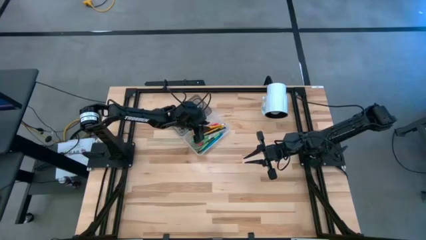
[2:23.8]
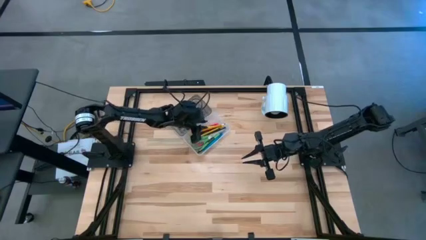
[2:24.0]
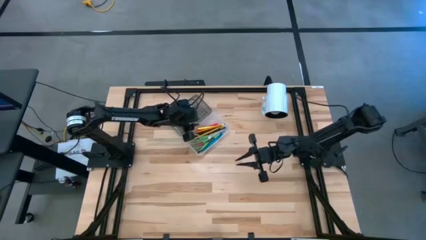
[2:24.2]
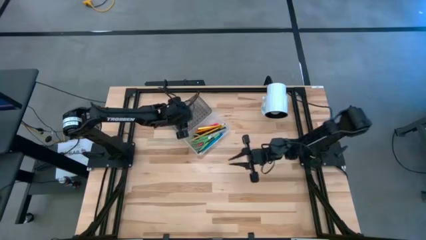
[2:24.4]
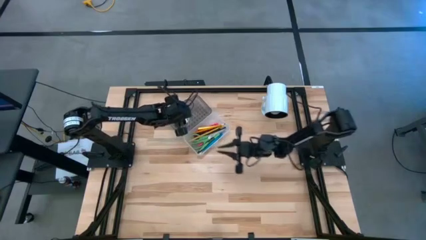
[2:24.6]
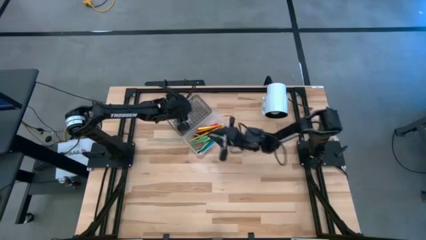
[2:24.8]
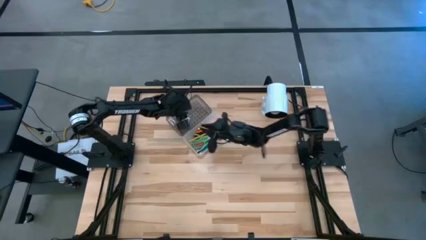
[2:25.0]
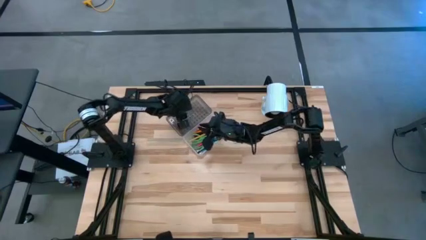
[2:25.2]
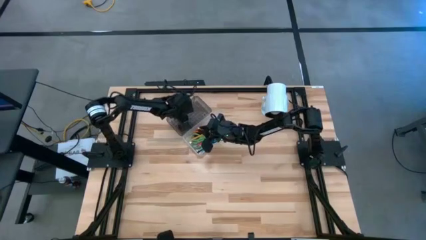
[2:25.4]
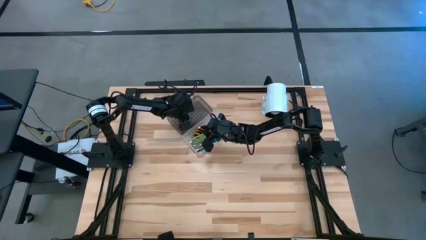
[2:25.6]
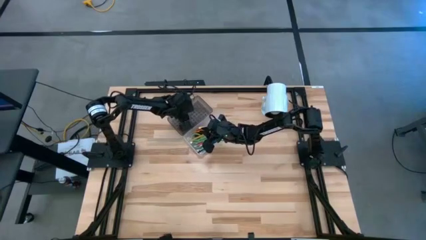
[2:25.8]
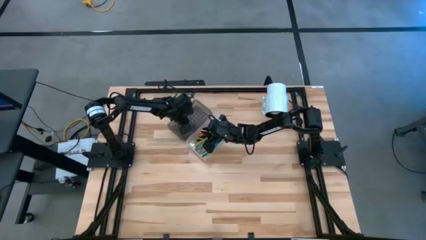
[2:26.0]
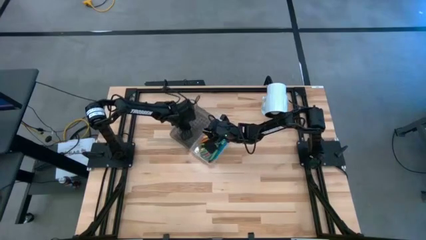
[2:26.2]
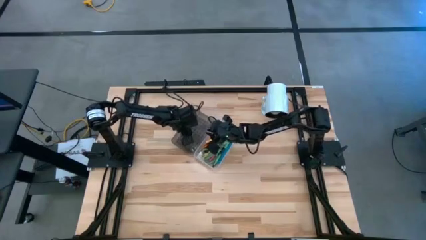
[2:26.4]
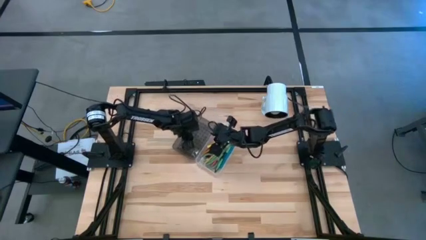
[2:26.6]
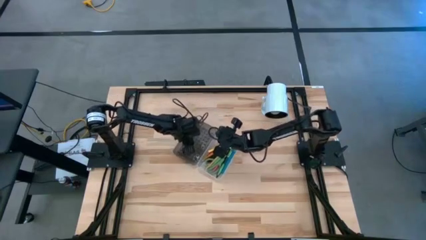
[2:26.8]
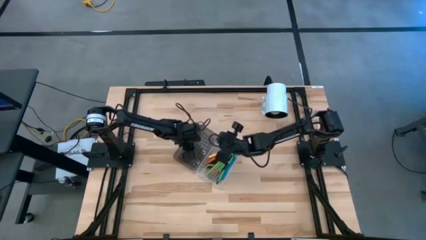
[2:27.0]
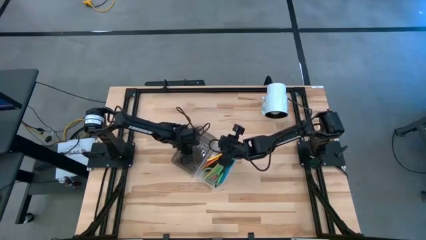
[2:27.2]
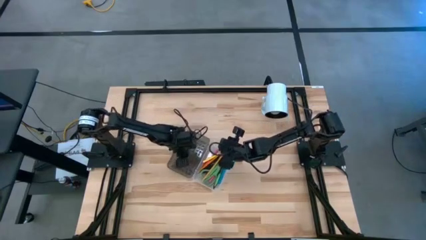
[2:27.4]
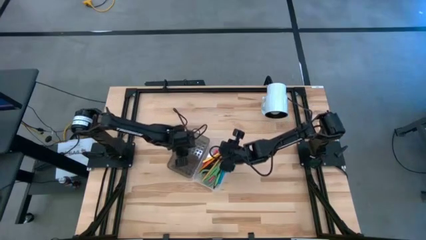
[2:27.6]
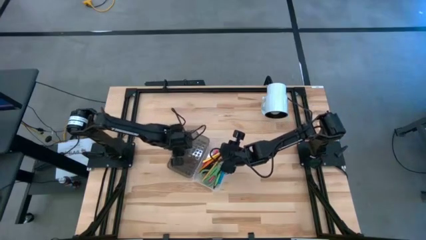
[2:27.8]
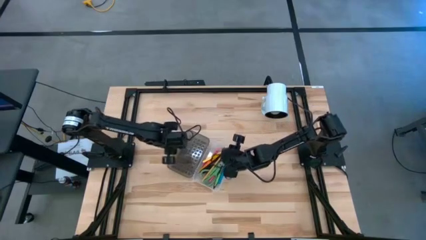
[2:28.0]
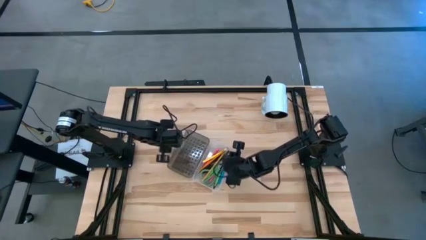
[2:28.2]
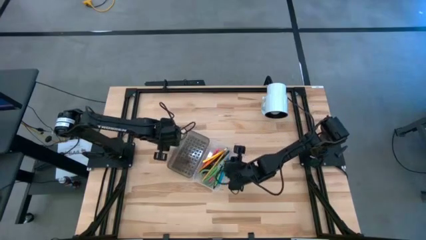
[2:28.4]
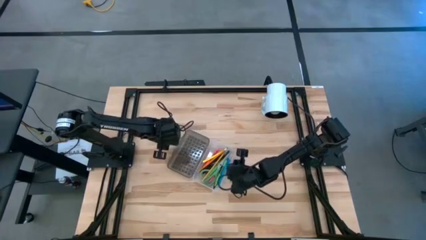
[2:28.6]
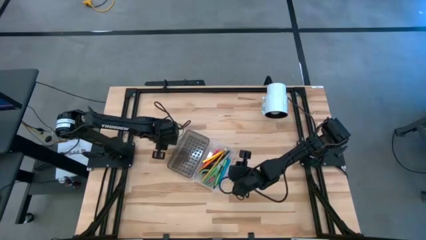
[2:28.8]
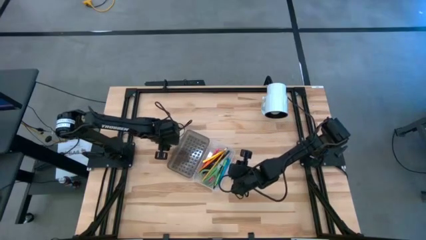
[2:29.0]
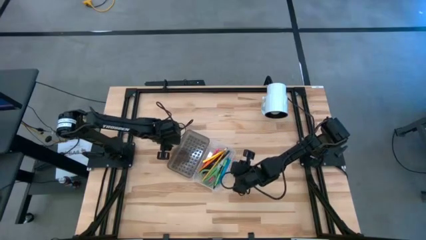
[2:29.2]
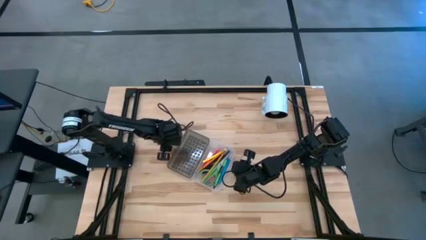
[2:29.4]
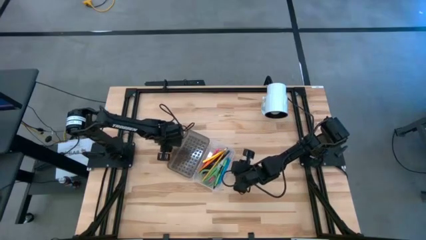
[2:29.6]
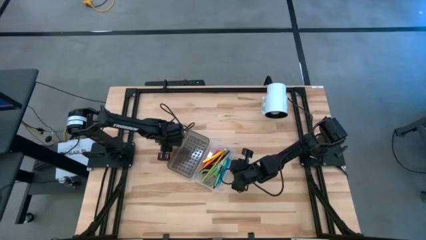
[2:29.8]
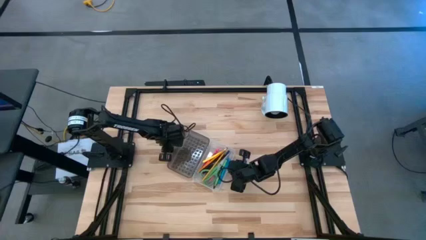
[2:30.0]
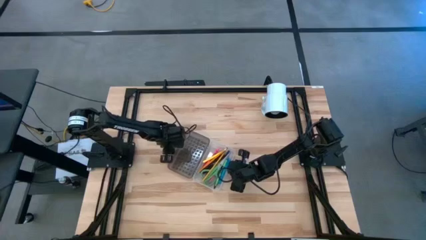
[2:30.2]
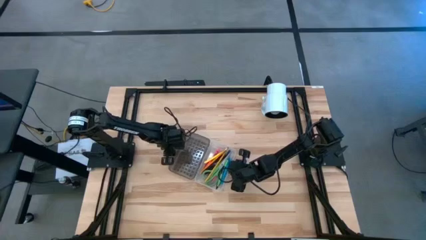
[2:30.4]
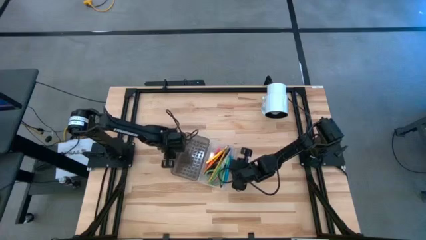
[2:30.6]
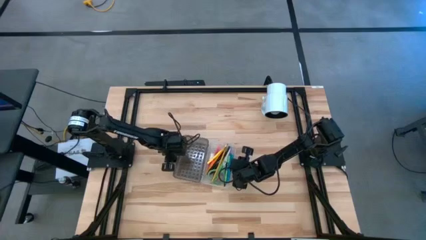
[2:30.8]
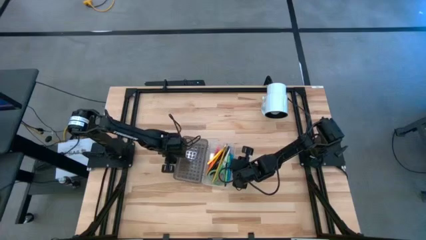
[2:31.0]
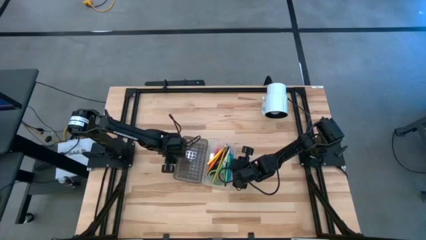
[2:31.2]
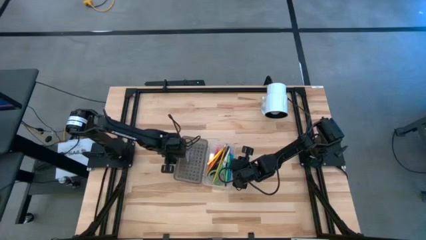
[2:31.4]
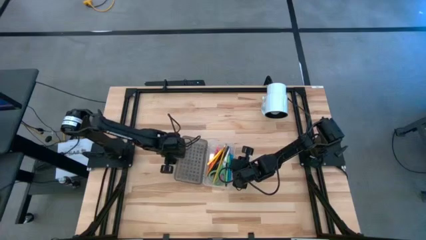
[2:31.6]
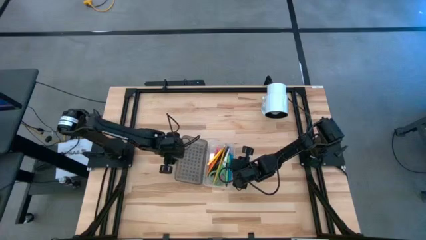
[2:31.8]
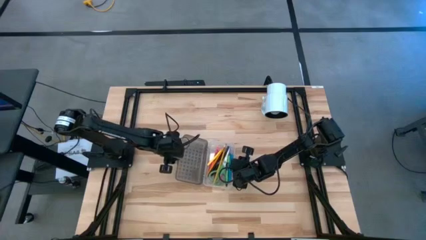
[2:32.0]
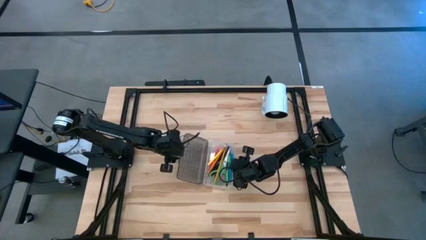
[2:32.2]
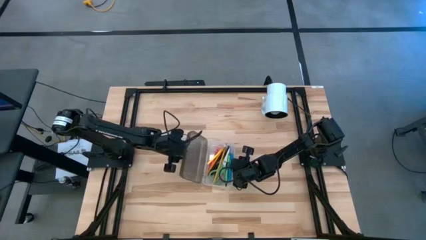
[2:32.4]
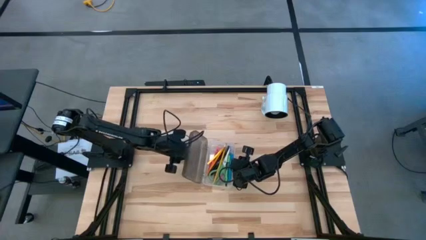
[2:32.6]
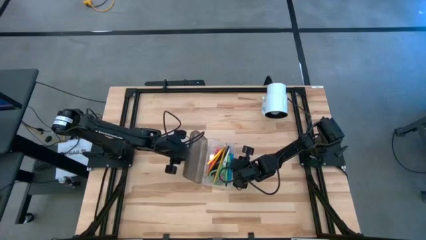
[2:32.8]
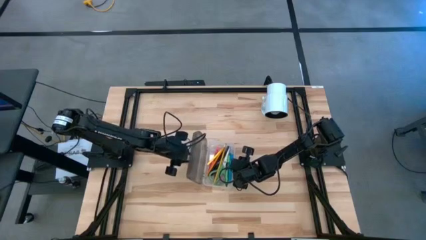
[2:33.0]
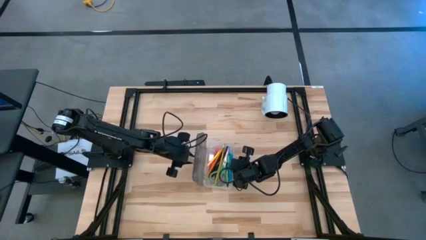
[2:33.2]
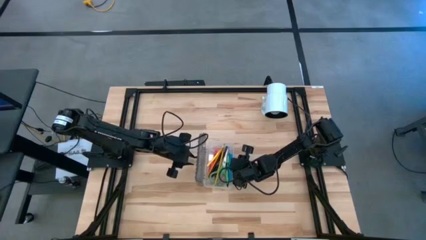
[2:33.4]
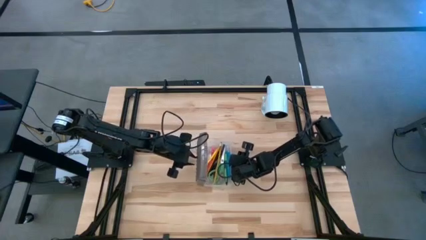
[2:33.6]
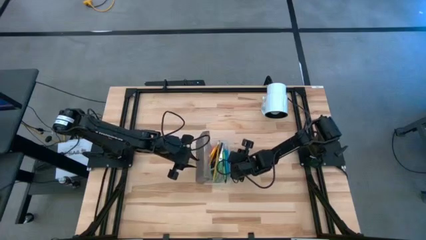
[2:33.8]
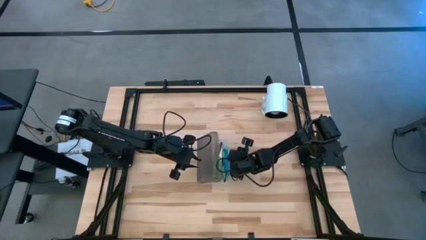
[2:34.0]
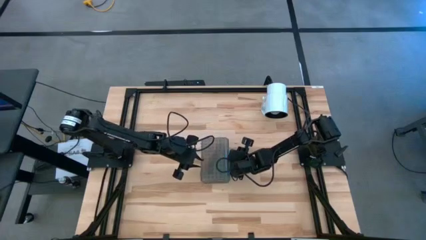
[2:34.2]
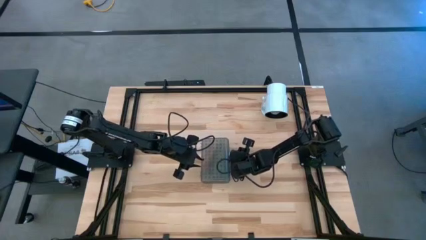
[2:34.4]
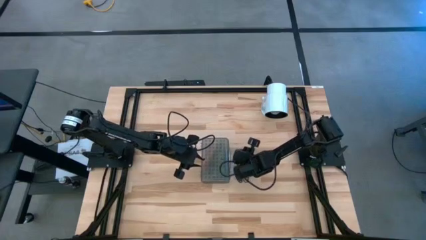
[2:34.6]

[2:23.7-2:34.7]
Task: Pick & place school supplies into a supply box
Close the transparent supply box

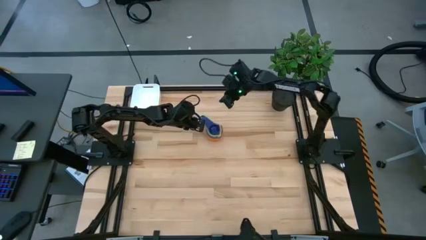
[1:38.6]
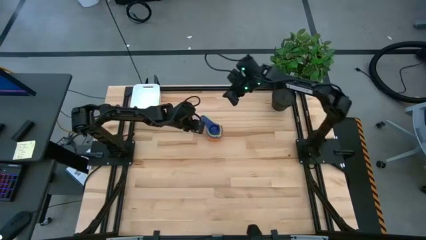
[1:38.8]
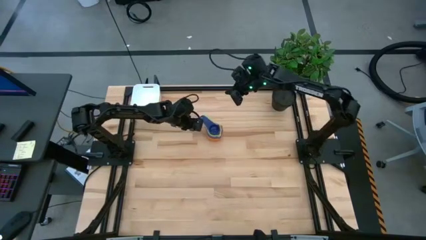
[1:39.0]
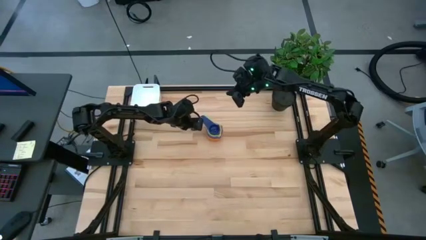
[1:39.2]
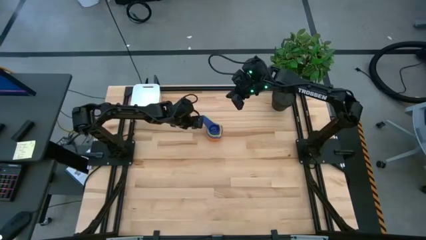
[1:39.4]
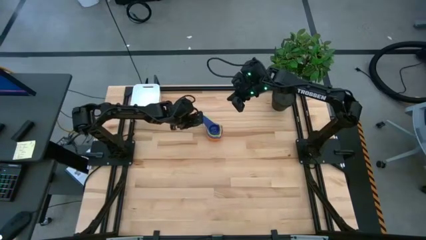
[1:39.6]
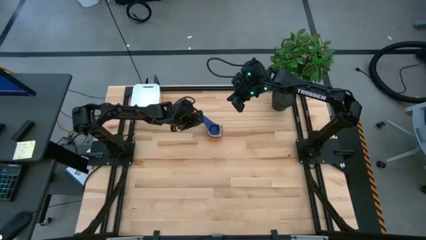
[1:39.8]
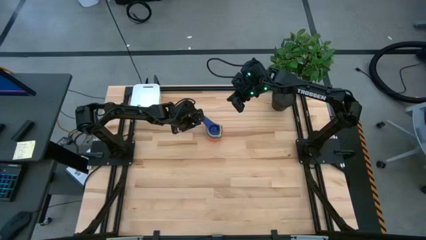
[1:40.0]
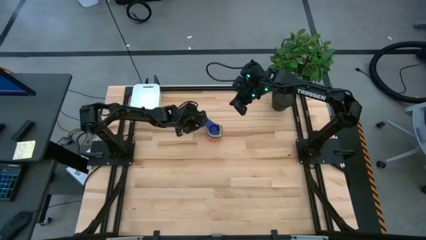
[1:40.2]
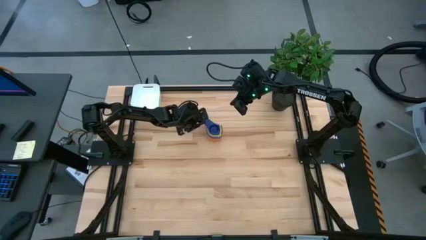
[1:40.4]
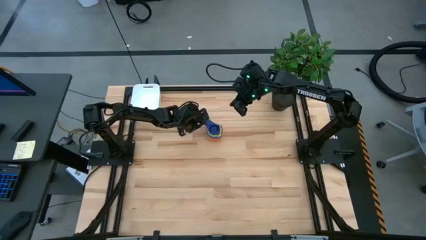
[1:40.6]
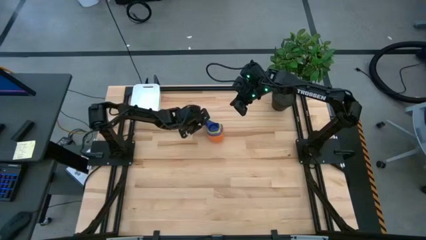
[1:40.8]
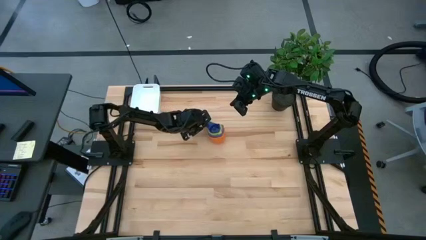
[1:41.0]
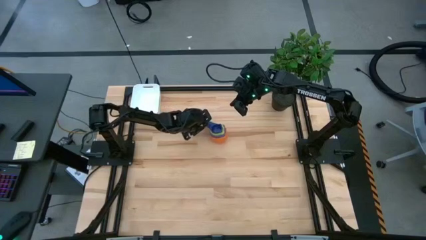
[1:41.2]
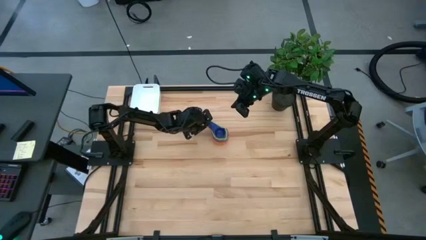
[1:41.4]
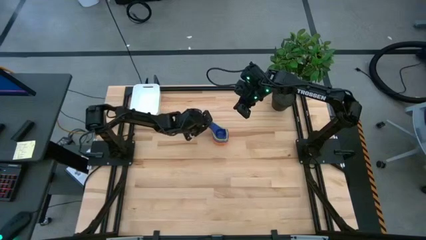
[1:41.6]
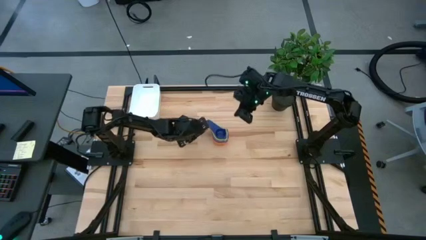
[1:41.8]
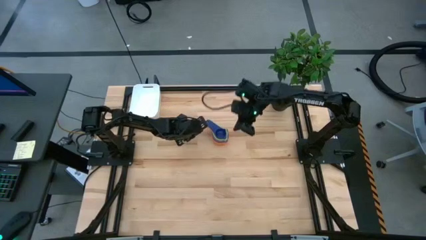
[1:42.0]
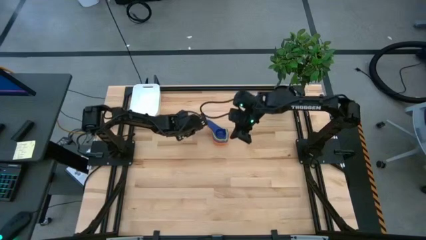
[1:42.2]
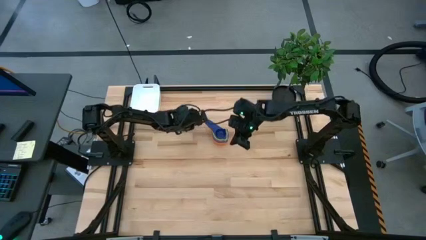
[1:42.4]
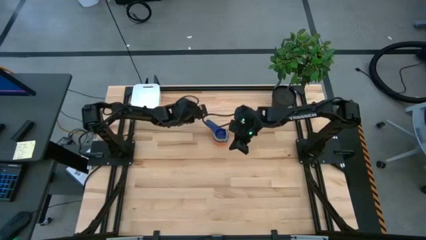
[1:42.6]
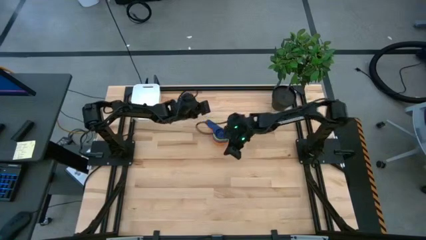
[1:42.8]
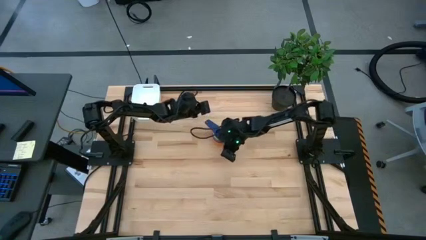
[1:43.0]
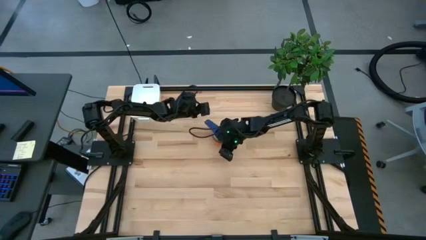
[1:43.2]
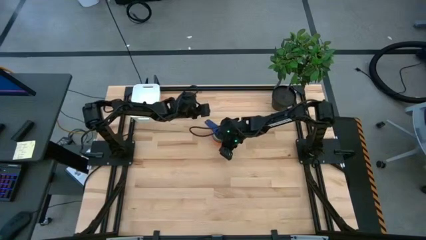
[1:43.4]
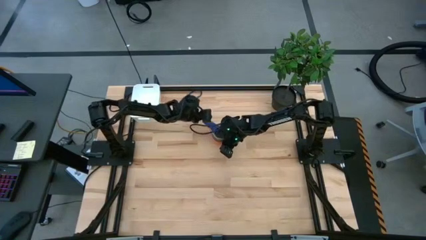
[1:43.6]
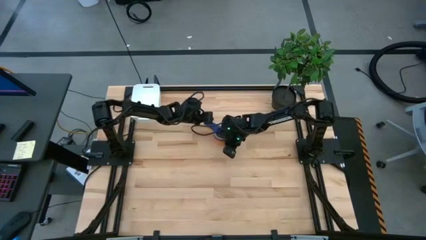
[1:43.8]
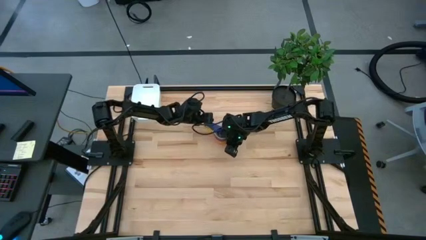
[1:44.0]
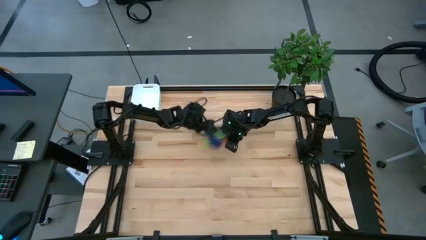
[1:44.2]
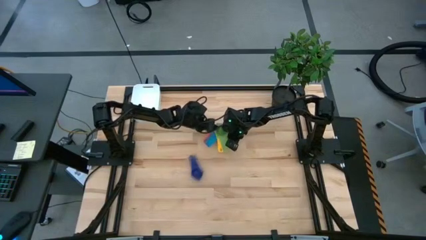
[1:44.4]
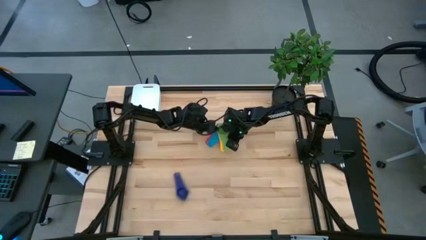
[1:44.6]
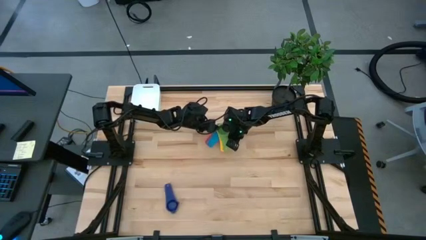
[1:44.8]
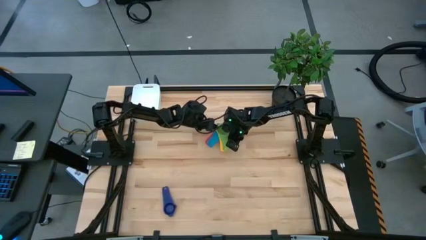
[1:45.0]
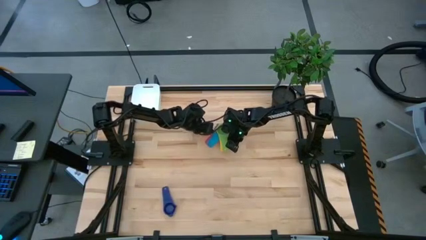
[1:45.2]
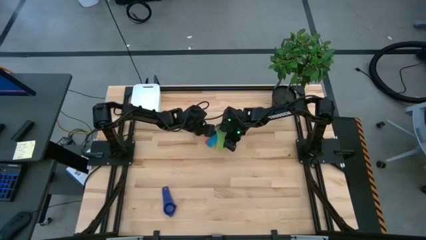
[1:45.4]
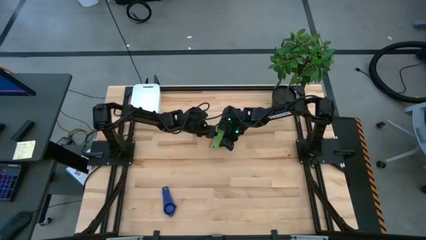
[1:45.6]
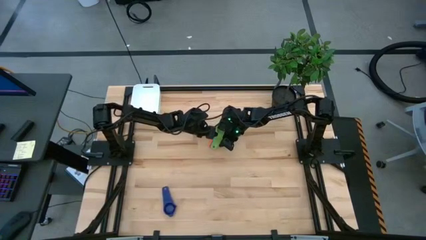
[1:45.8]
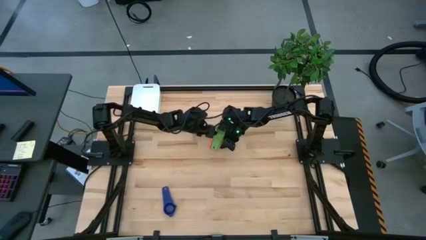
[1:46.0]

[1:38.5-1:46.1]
Task: Nest measuring cups in basket
Adjust the measuring cups
